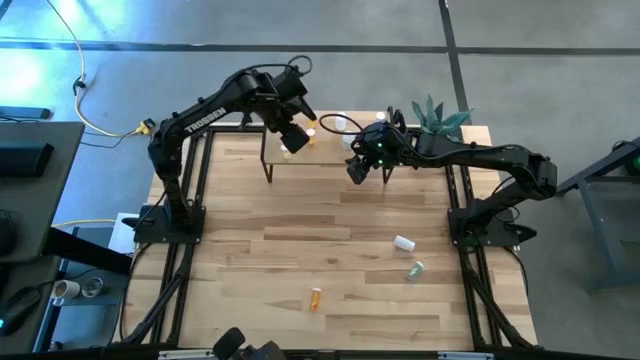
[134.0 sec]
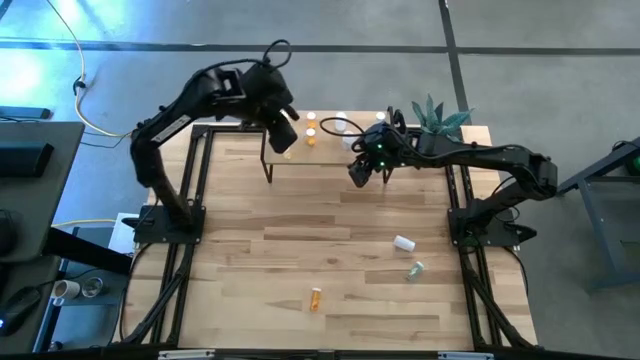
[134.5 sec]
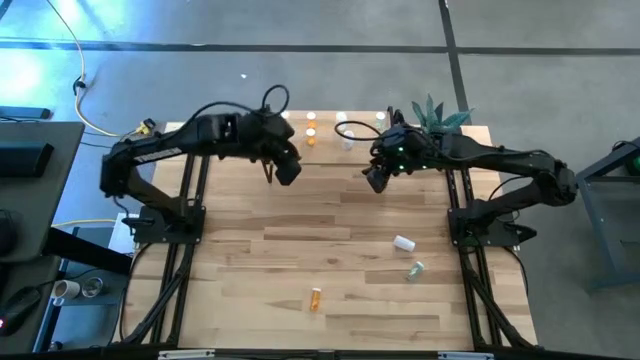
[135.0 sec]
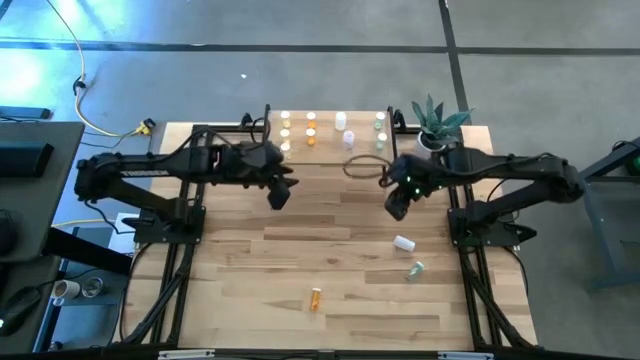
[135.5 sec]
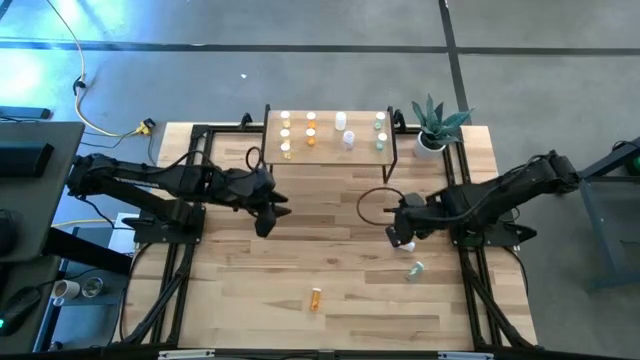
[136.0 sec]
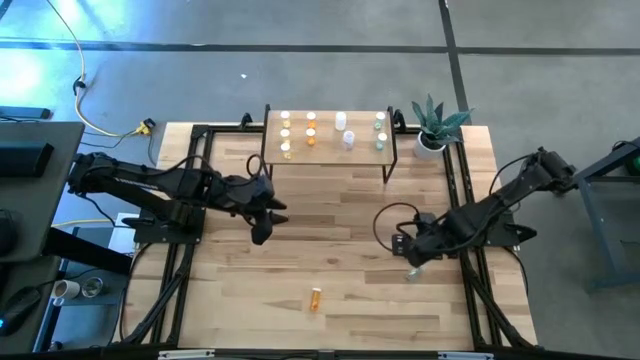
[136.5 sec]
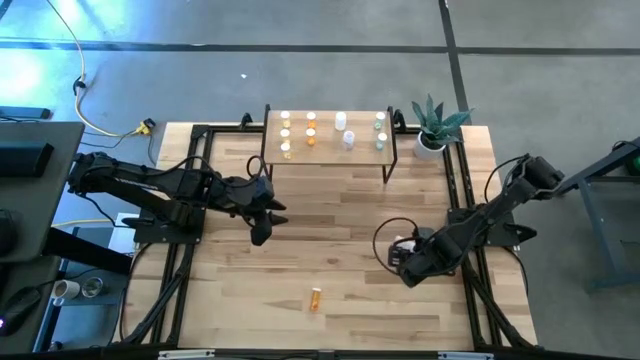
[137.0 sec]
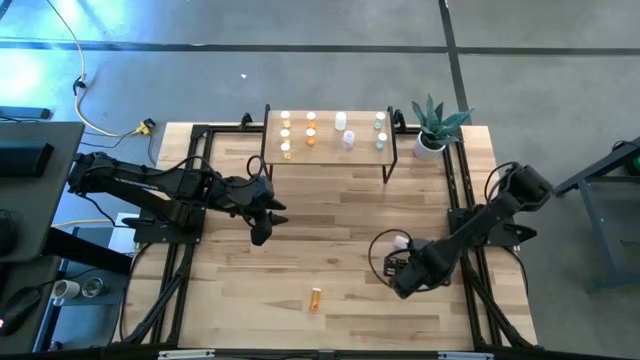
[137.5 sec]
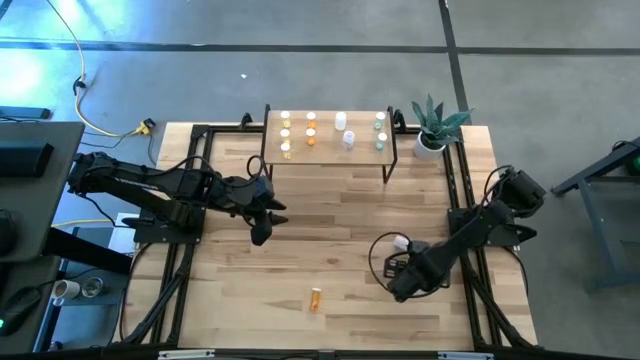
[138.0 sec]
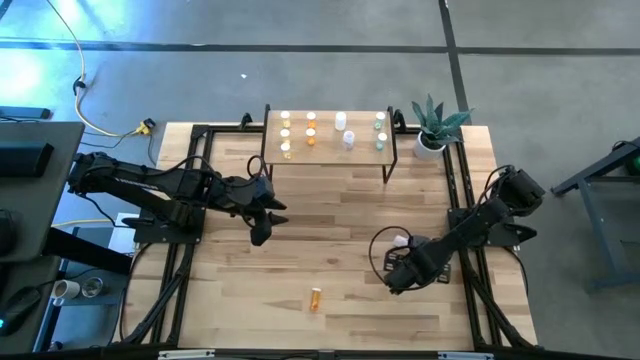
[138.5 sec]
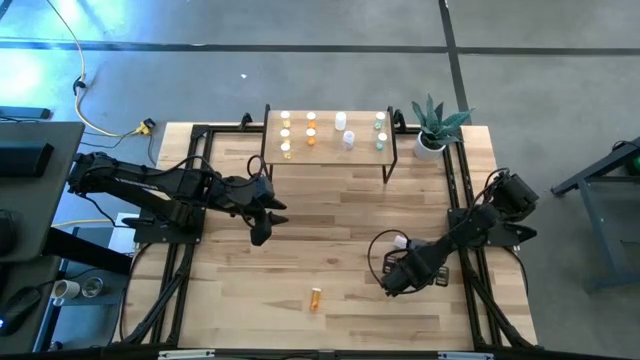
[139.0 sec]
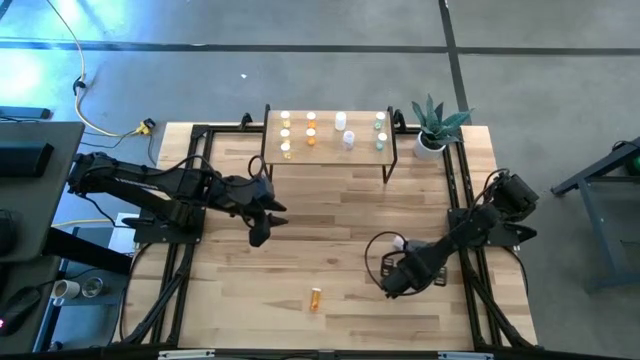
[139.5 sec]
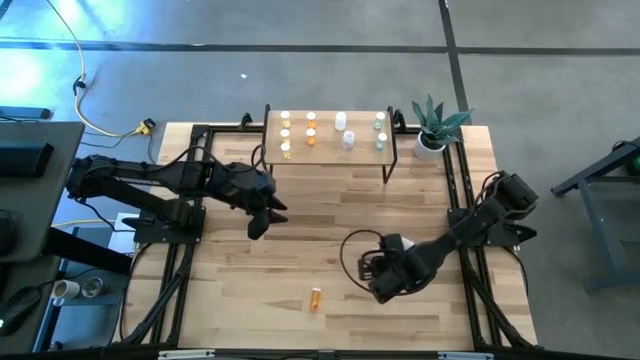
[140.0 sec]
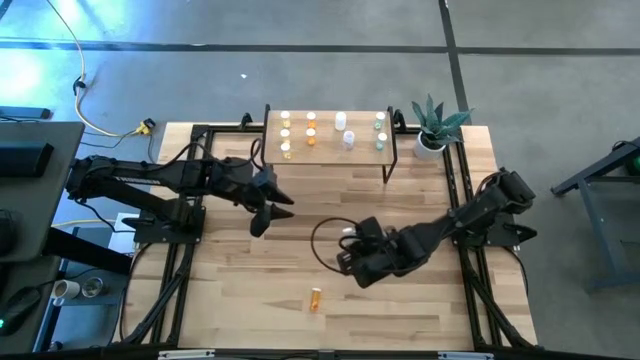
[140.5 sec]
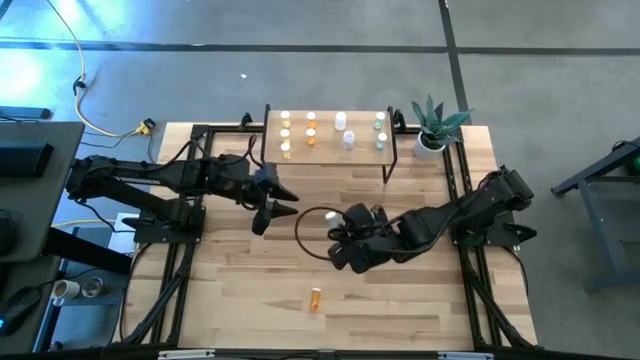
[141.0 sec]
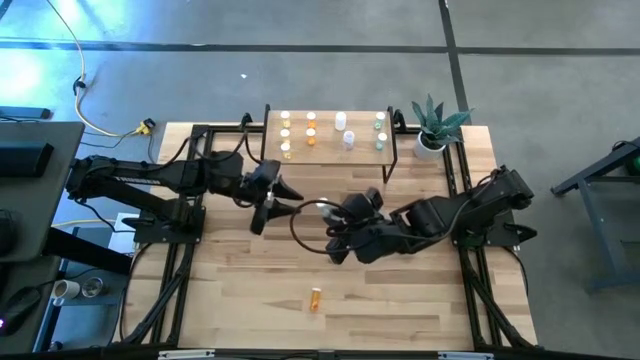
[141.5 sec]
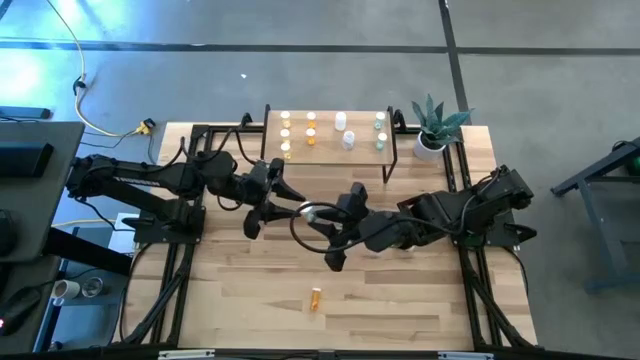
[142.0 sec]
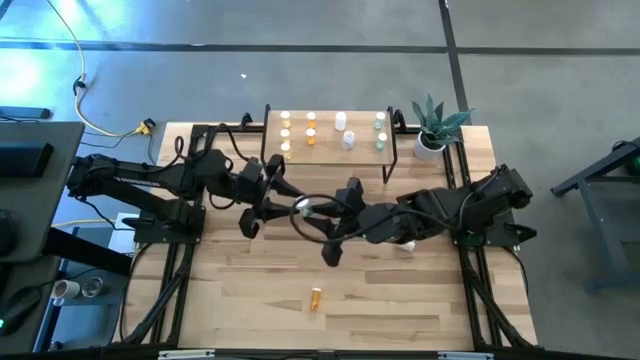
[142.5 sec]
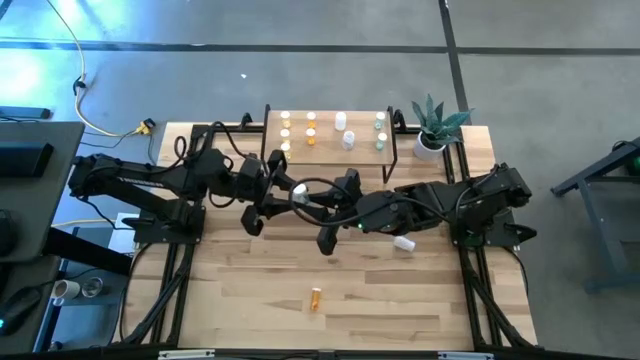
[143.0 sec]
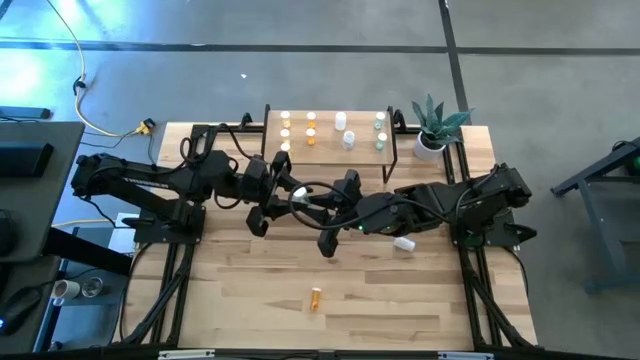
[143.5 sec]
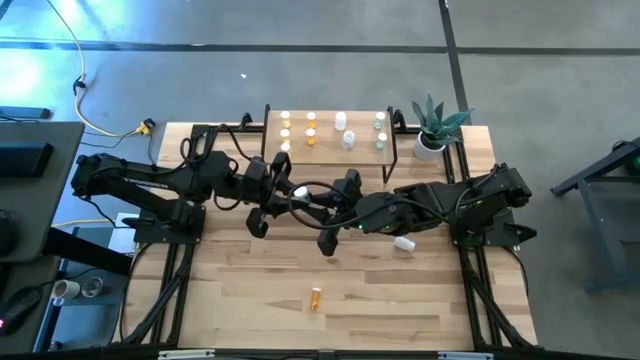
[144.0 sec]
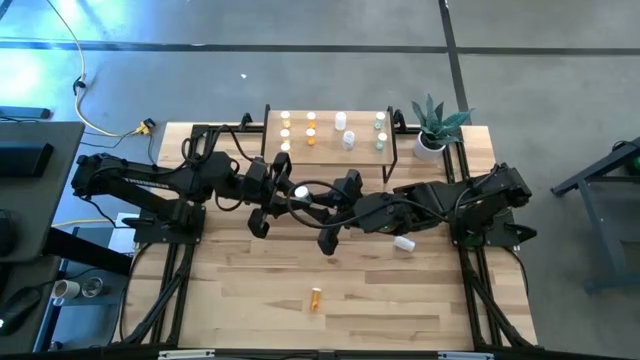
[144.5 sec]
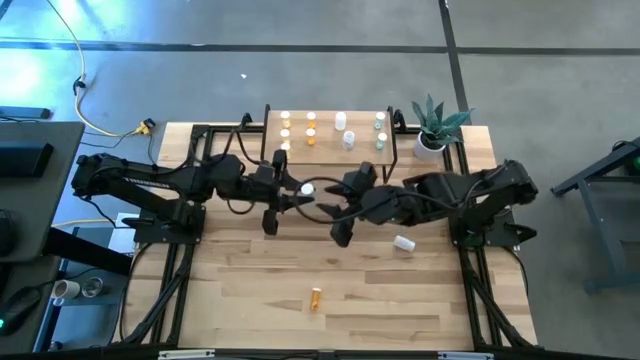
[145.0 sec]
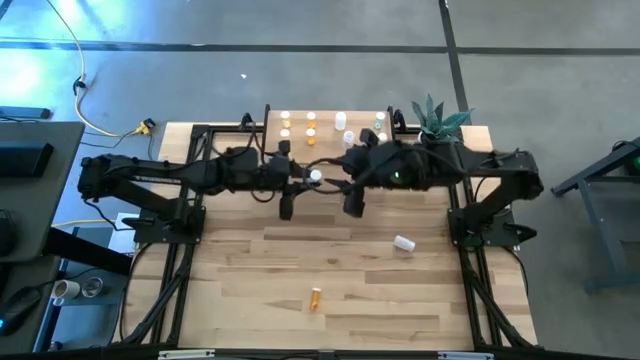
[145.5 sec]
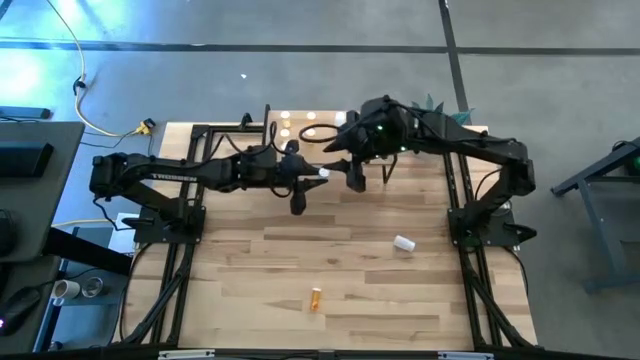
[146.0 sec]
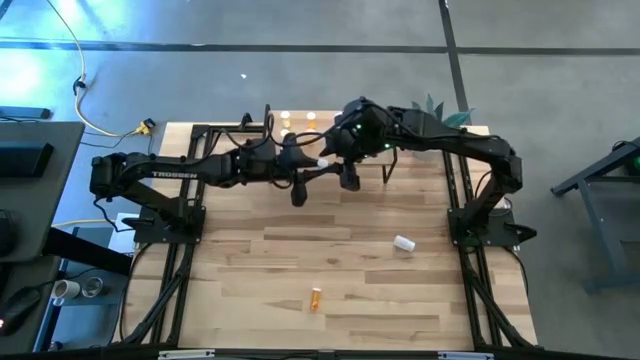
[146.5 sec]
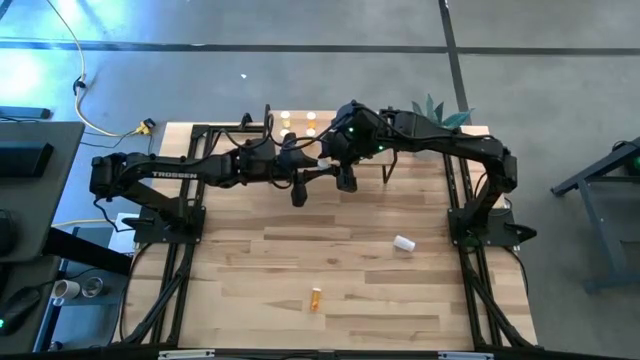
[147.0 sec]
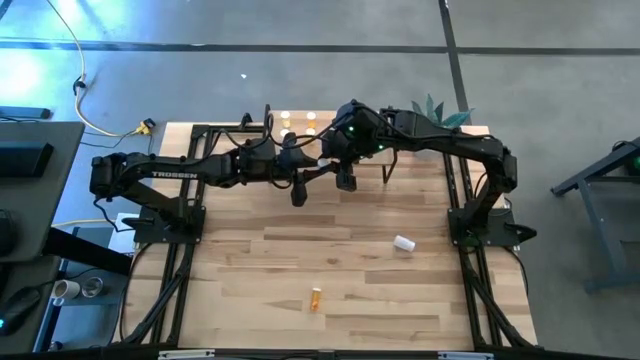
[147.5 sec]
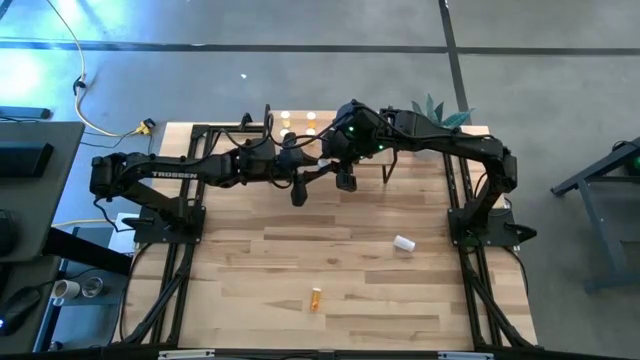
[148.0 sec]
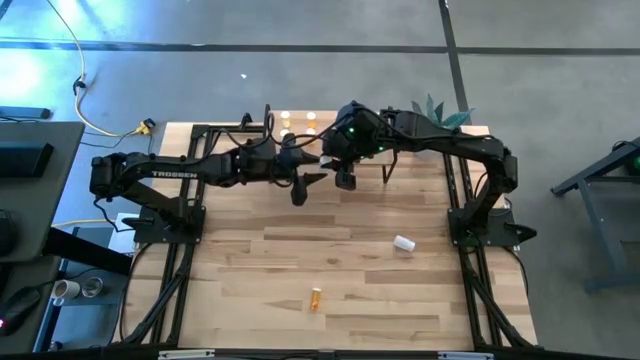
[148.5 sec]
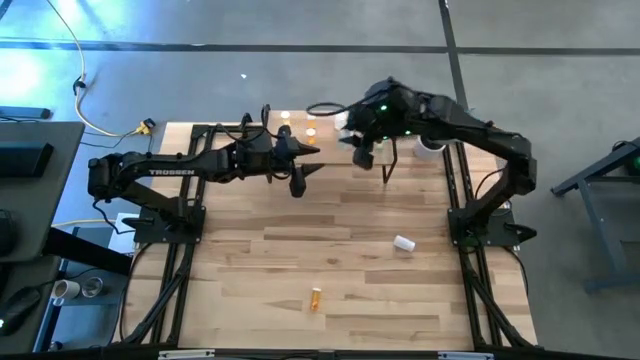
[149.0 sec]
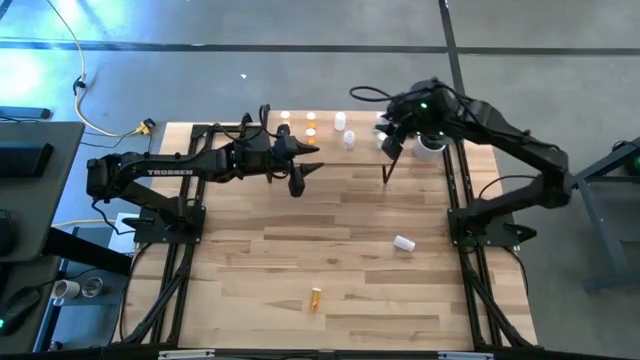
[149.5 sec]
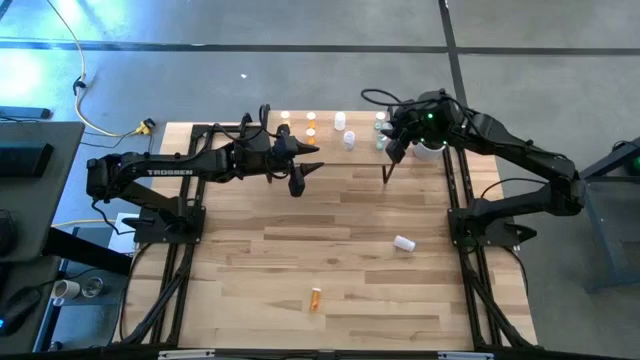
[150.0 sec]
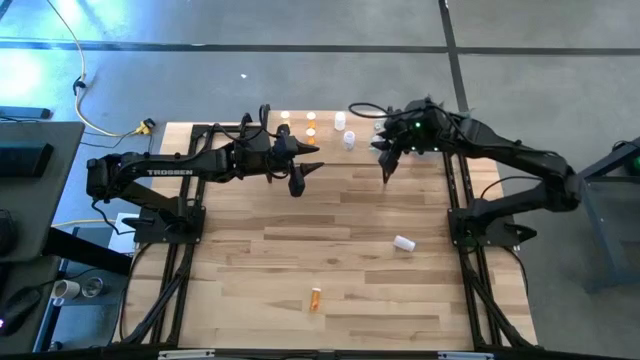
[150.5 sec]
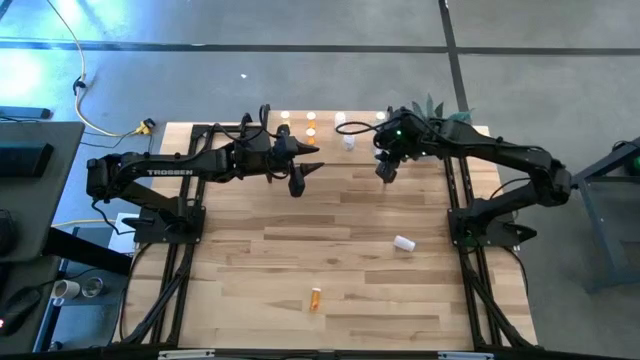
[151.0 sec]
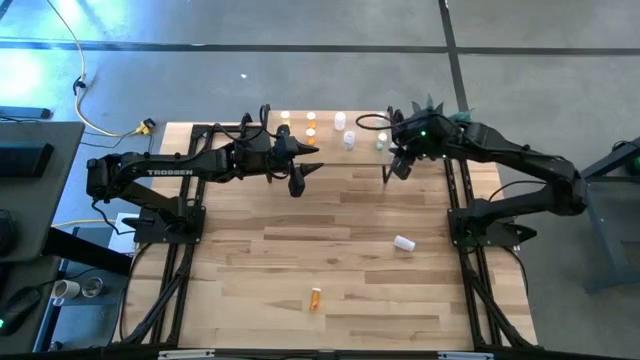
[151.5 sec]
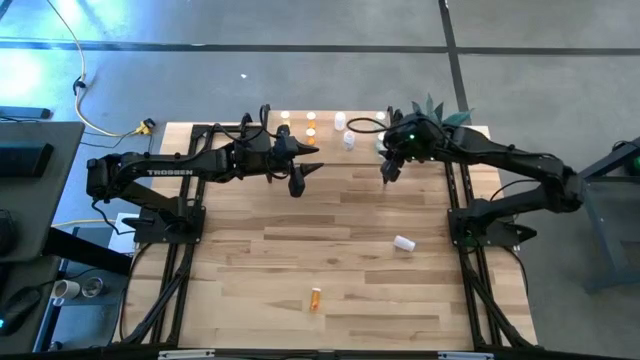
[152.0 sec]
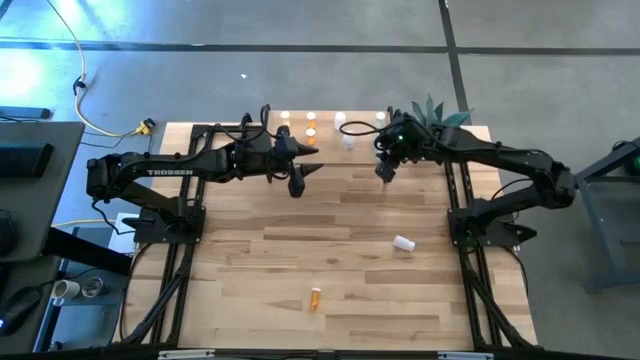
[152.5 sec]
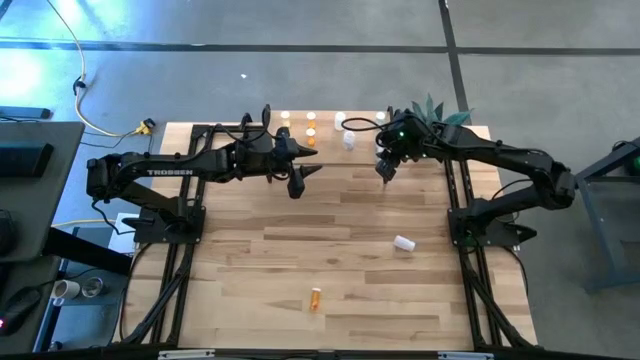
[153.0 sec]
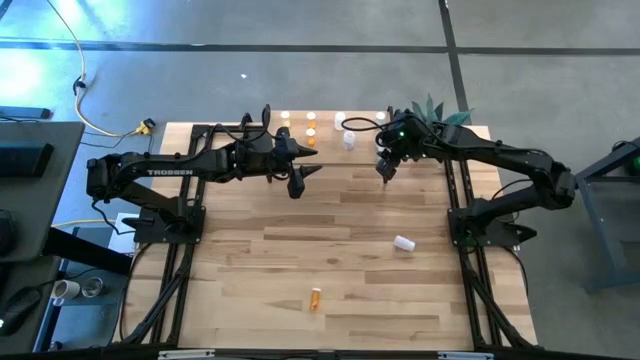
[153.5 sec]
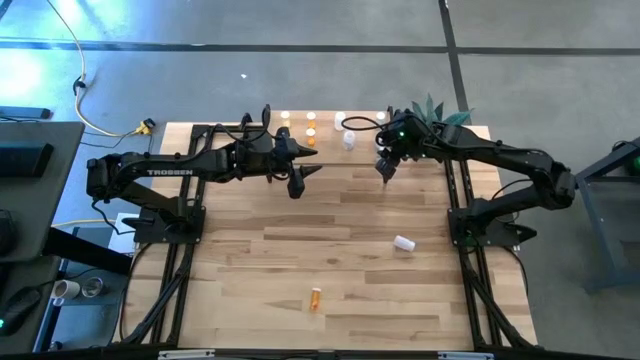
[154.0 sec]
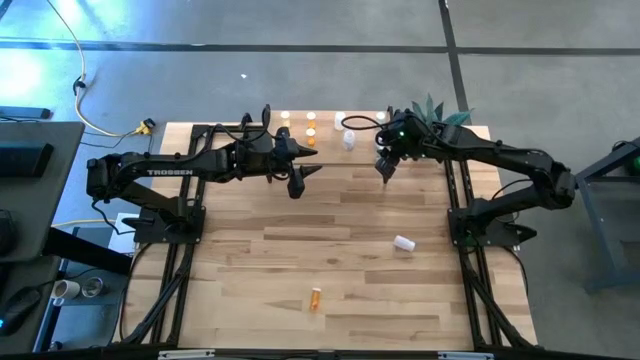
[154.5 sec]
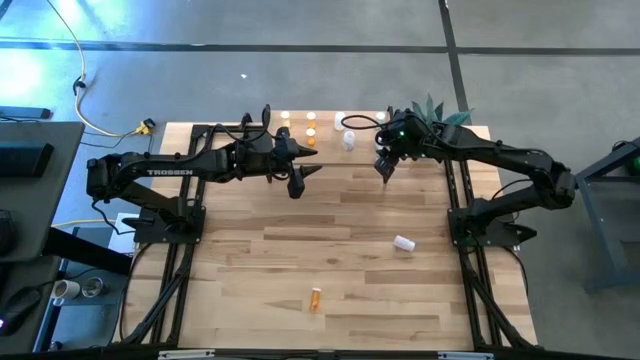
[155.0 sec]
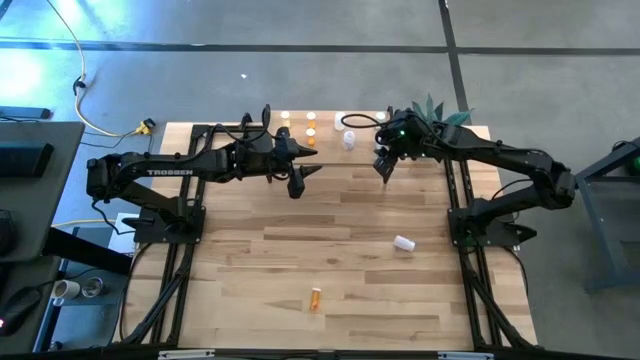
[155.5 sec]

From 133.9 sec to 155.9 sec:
Task: Pick and place medicine bottles onto shelf by color
Put the blue pill bottle on the shelf and align it to the other blue pill bottle
